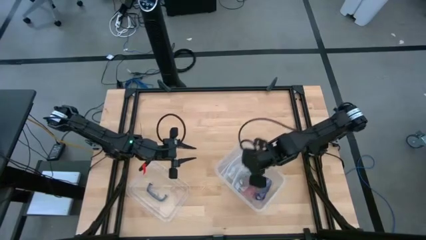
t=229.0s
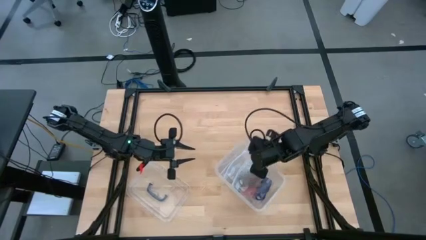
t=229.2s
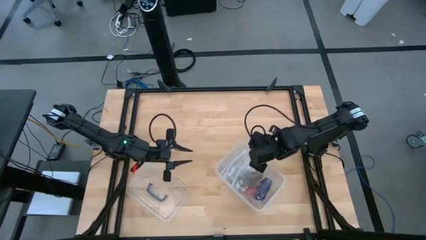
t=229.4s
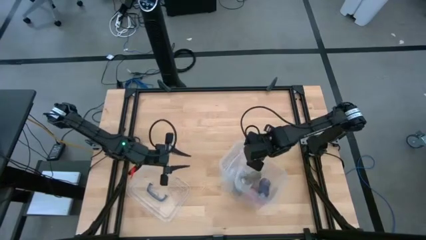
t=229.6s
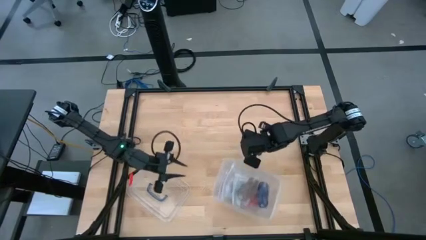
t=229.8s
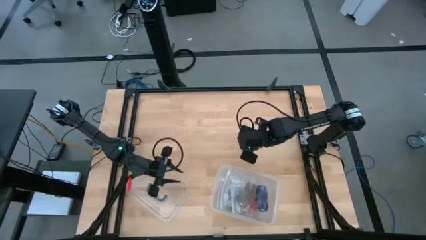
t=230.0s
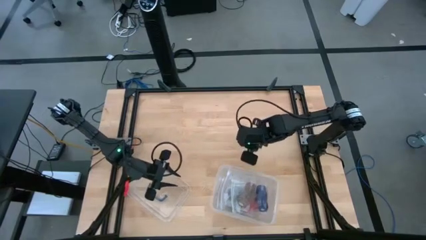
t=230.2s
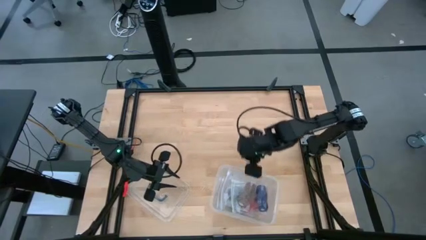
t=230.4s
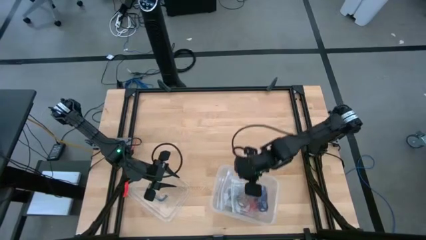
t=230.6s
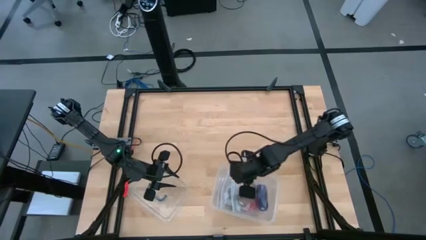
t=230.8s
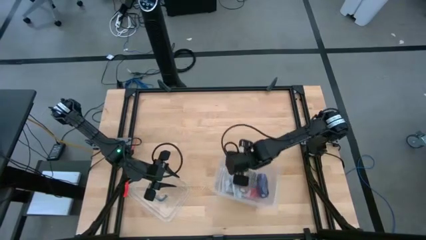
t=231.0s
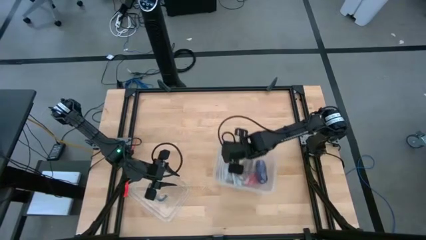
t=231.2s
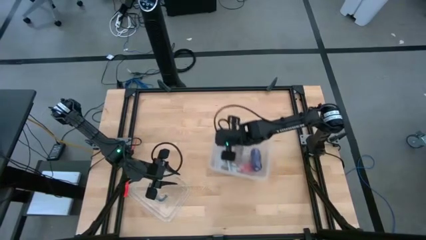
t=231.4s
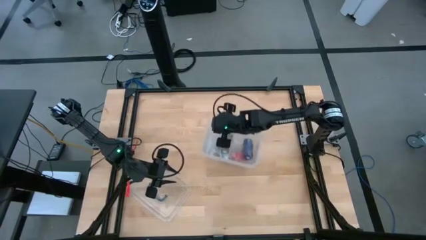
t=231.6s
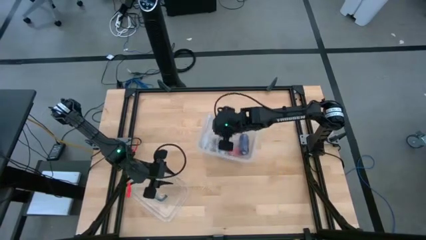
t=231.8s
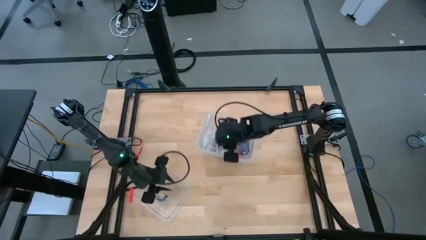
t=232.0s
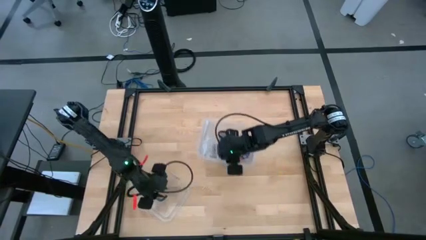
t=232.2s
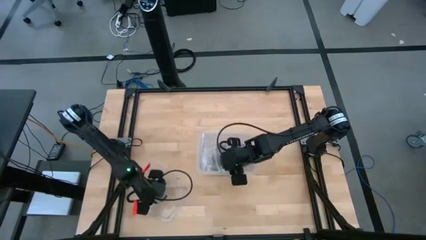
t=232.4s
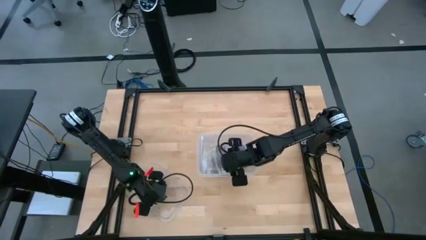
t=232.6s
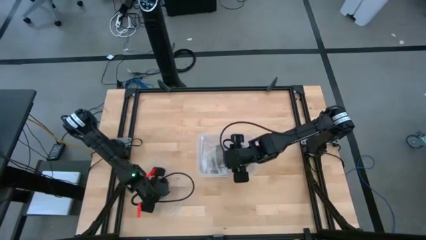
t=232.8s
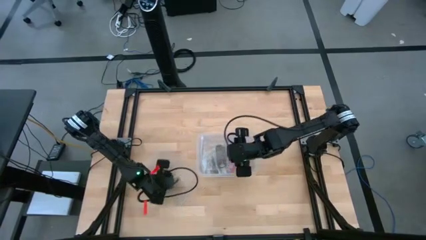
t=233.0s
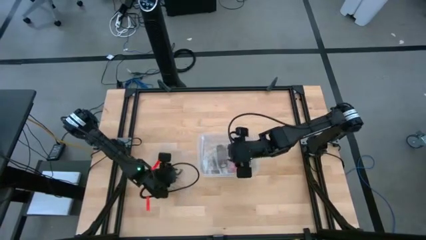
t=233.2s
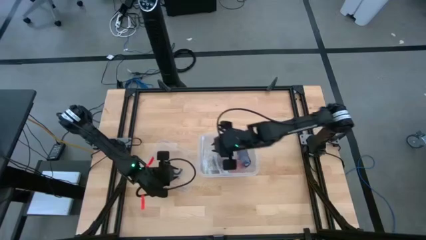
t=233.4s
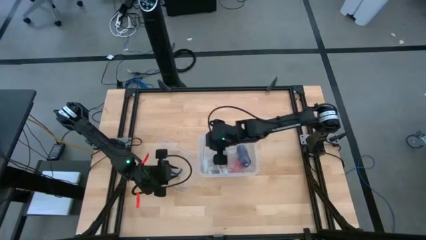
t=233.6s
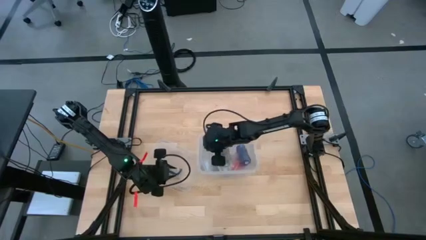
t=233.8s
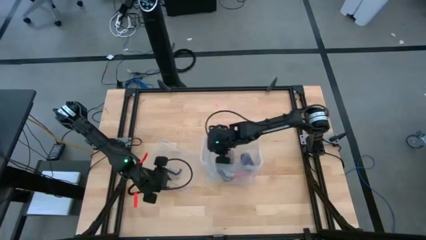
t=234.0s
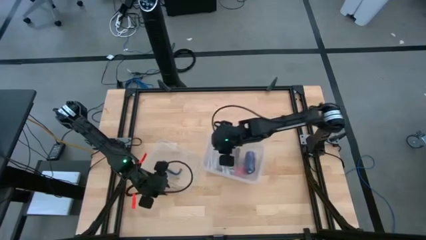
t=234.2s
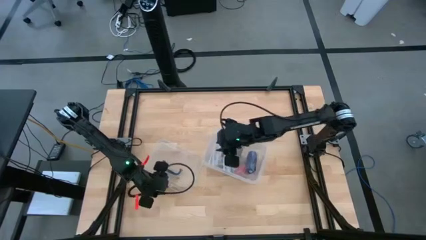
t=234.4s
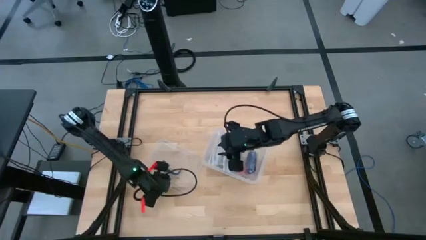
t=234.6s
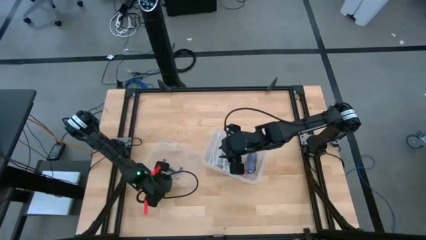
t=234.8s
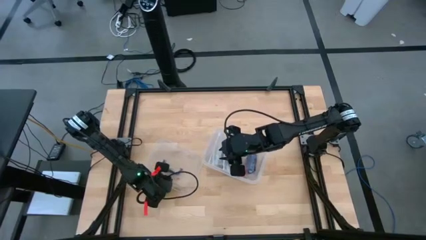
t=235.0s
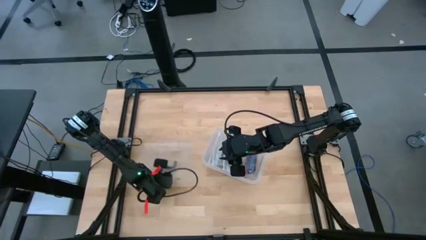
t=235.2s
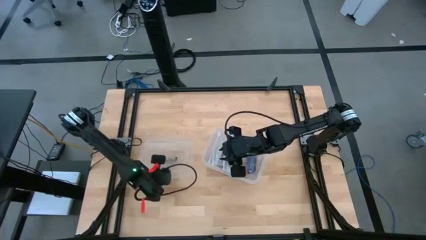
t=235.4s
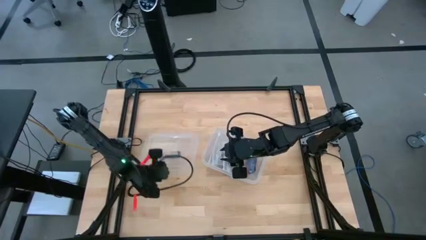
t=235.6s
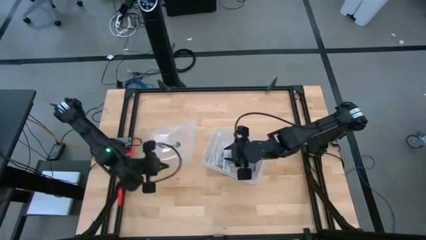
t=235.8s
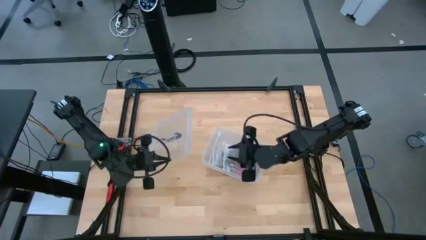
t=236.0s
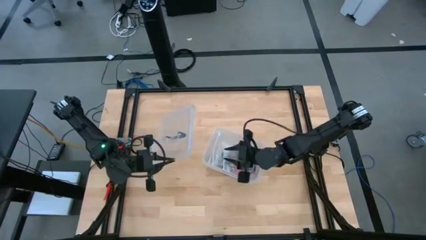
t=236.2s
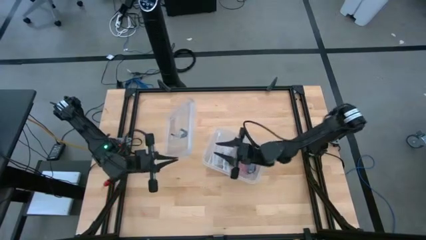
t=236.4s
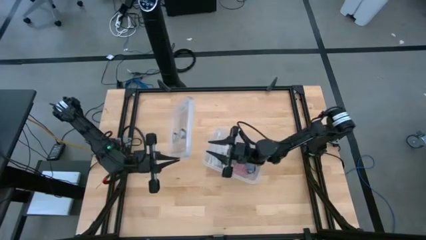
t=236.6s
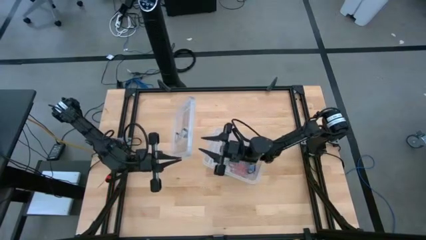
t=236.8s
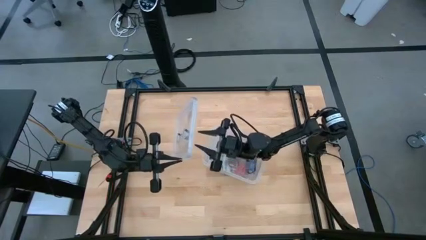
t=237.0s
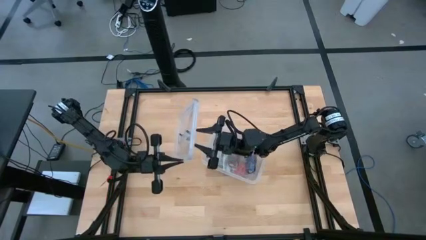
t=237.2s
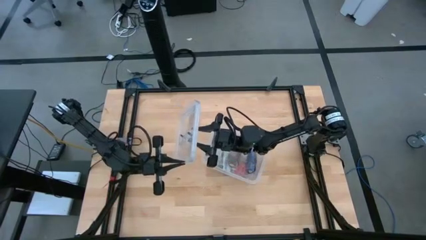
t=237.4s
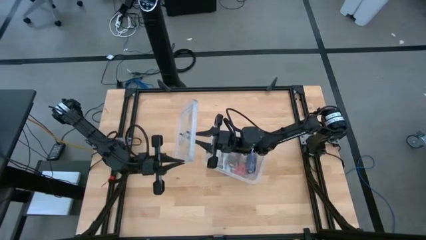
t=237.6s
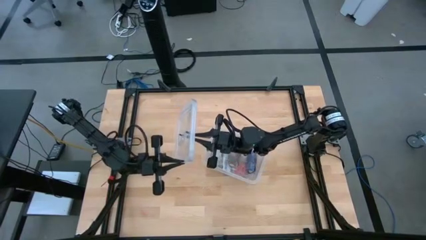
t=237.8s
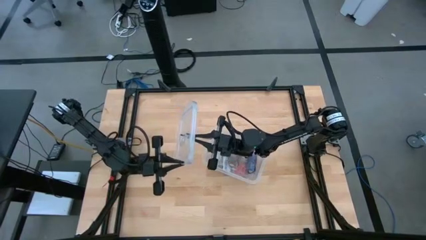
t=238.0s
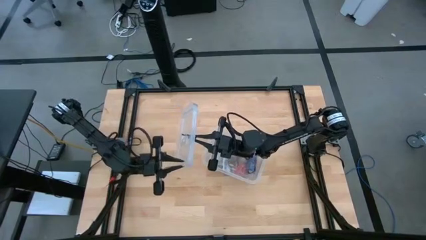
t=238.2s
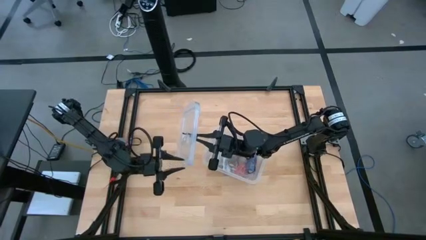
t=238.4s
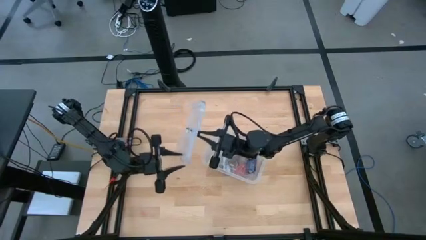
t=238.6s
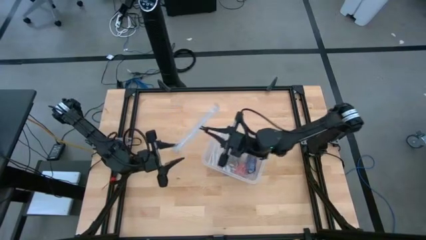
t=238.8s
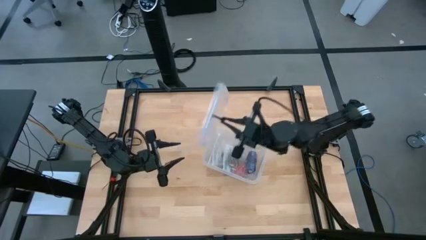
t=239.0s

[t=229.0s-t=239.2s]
Task: Roll bandage
Close the transparent bin with the transparent bin lid

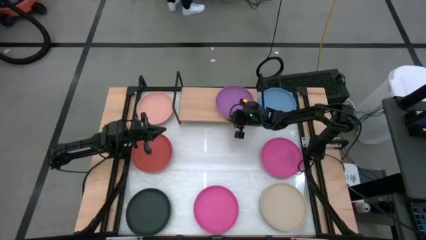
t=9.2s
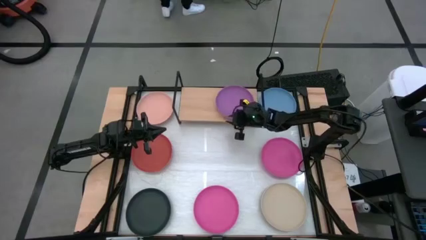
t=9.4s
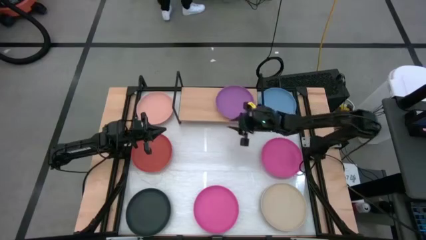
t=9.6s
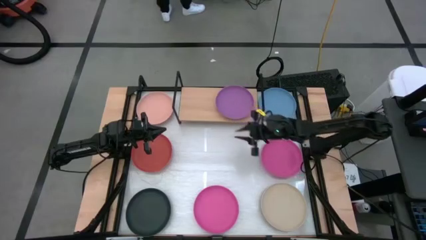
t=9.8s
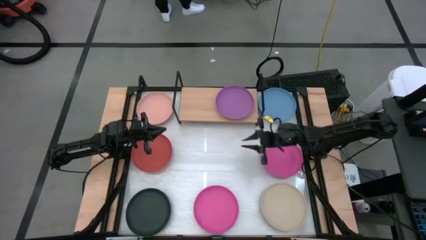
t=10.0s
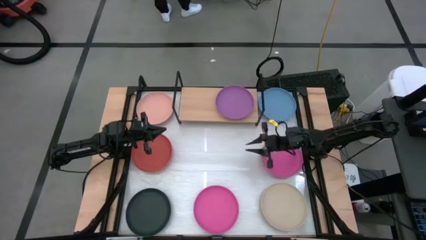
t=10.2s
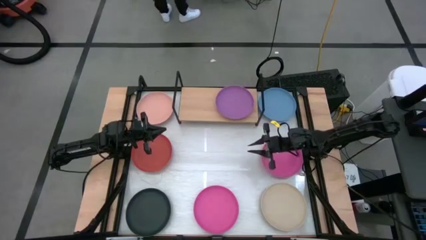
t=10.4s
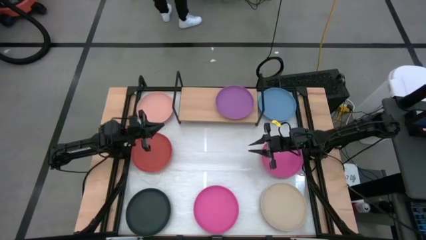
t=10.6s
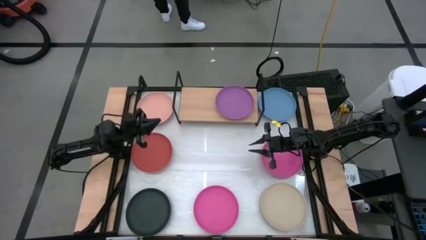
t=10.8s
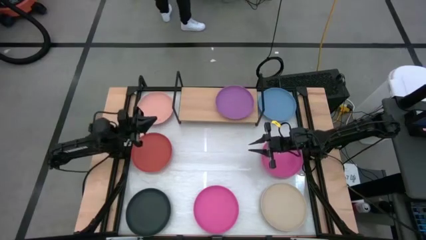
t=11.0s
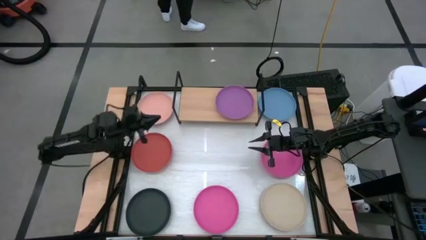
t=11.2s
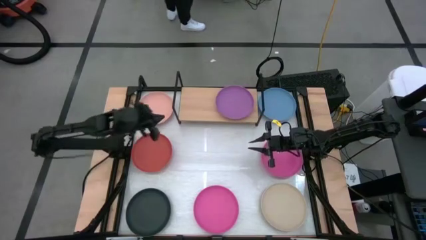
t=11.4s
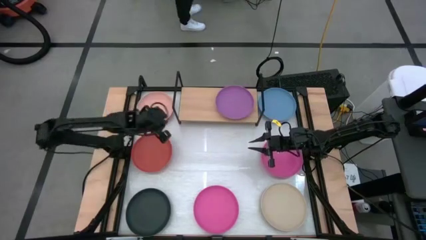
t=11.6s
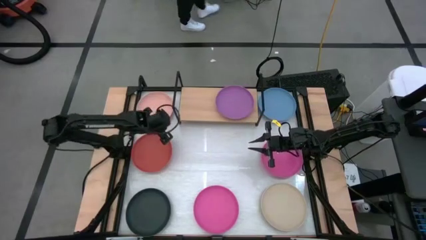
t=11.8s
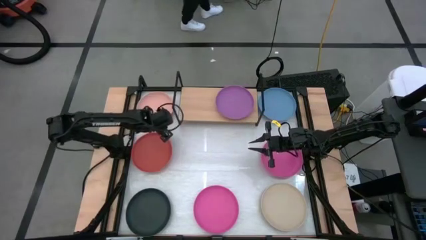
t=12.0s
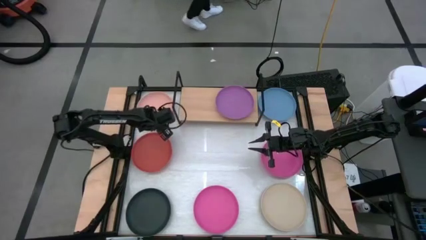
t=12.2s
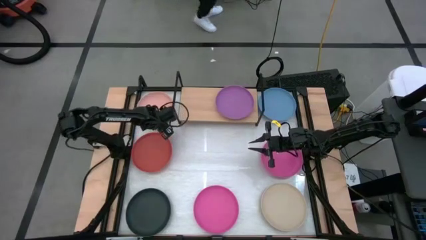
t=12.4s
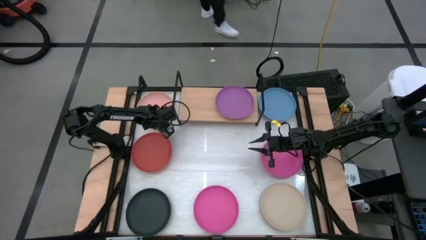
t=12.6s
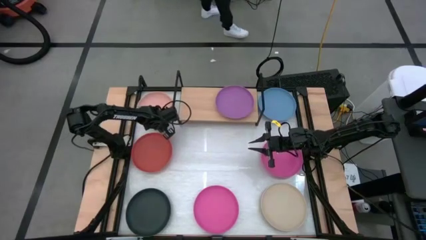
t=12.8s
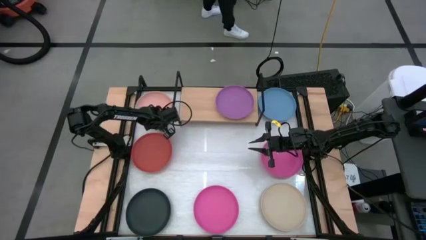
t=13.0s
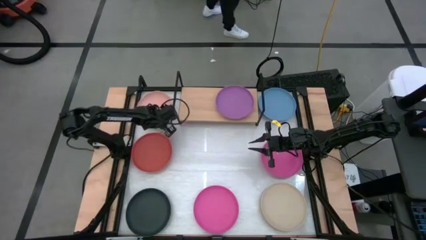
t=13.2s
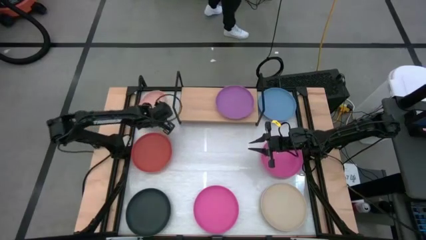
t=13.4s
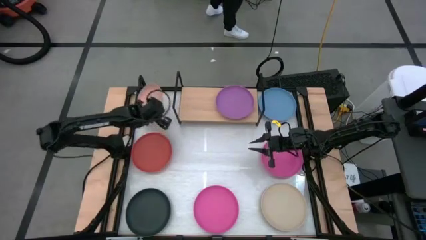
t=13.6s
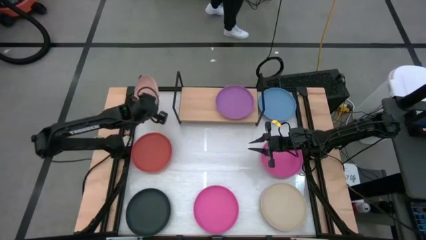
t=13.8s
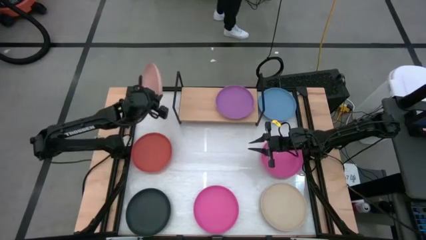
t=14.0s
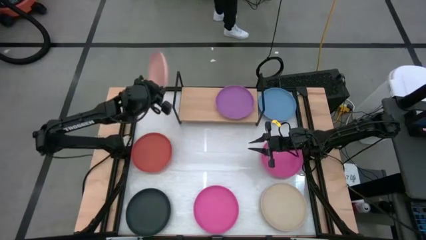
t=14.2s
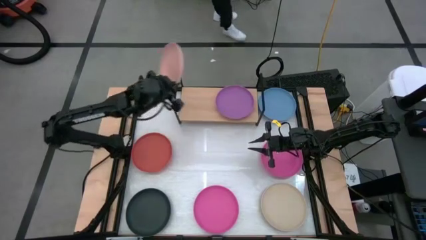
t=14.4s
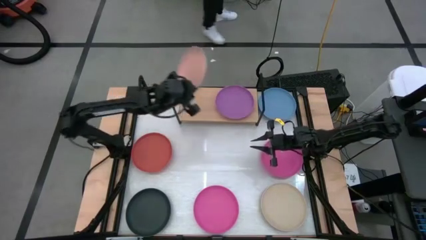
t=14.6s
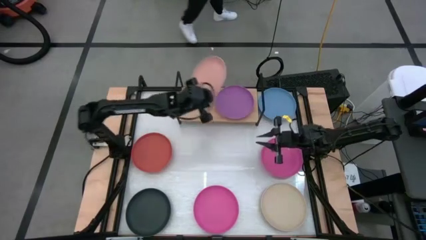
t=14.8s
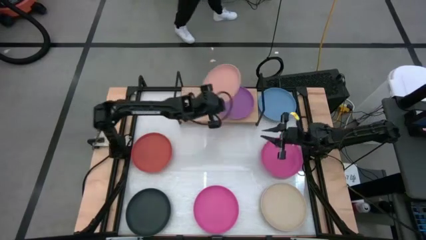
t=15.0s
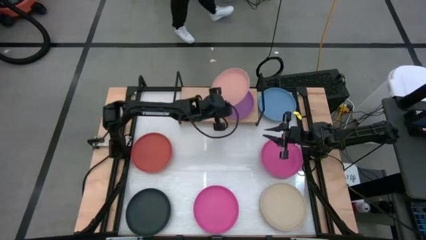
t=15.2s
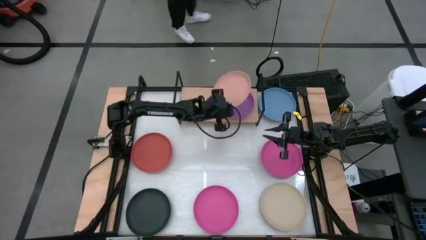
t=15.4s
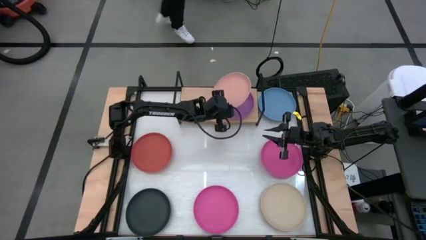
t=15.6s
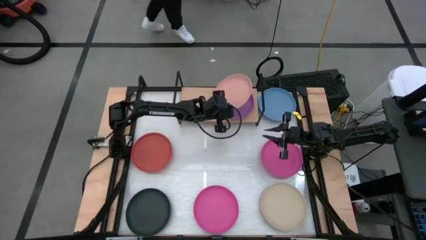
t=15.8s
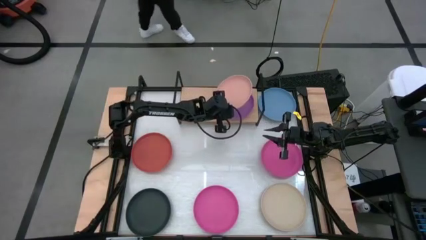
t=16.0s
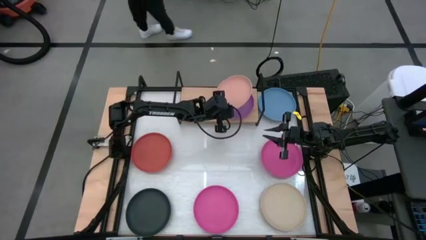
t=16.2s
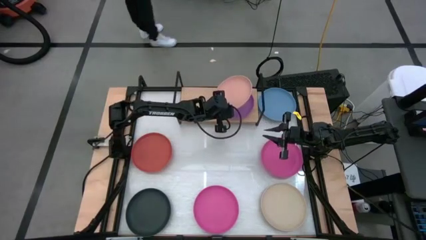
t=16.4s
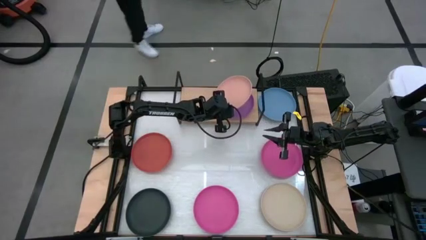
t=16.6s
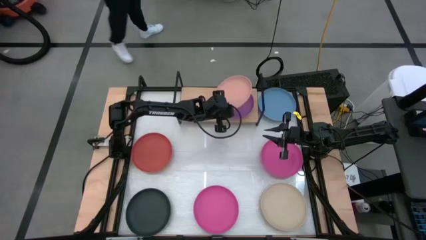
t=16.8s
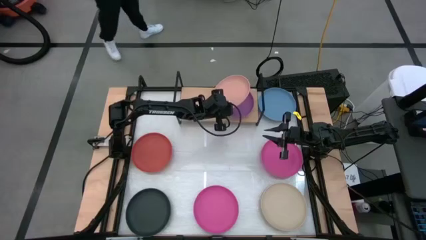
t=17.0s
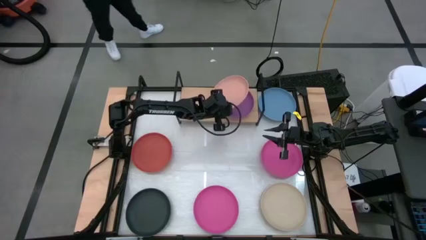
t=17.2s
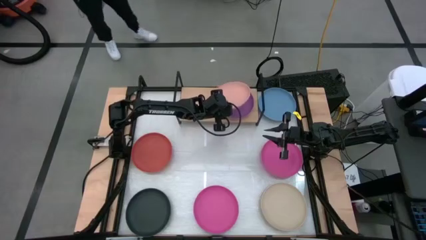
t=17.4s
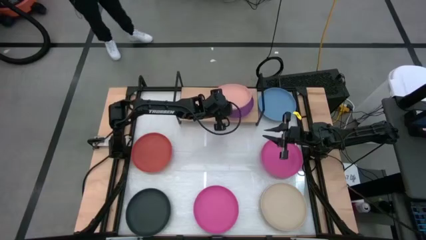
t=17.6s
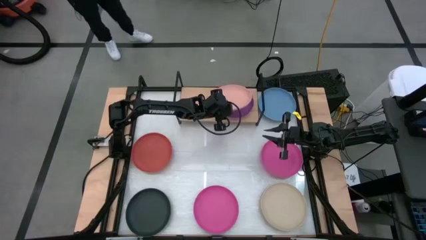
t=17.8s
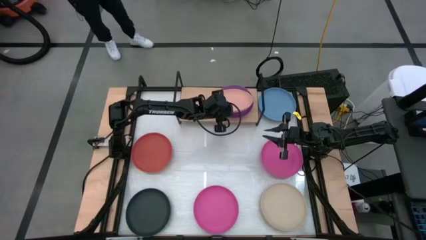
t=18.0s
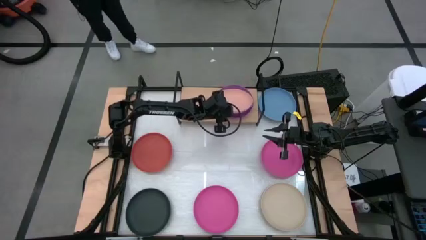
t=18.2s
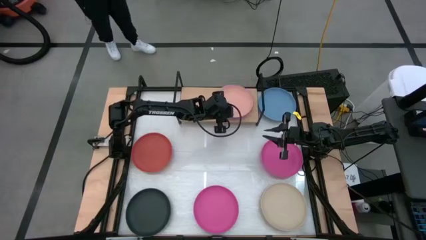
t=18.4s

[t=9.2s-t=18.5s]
Task: Place and stack plates onto a shelf
Stack the light orange plate on top of the violet plate on the shelf
